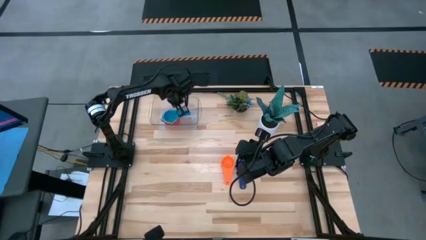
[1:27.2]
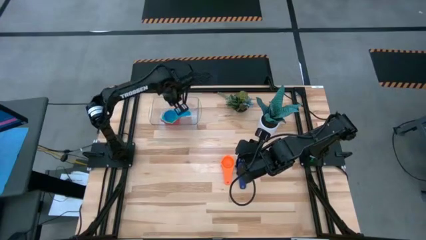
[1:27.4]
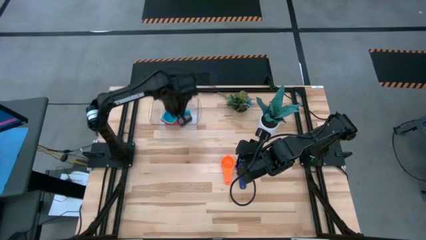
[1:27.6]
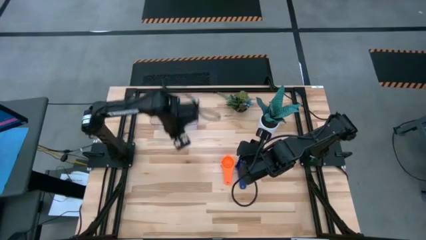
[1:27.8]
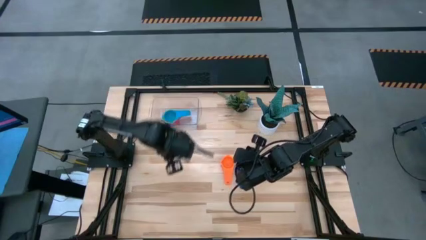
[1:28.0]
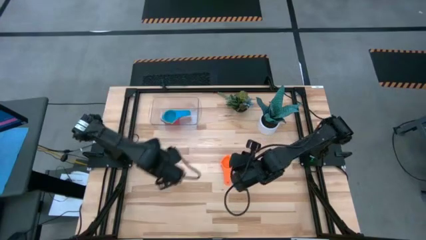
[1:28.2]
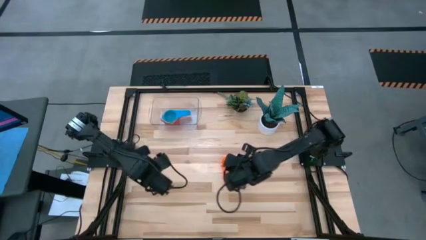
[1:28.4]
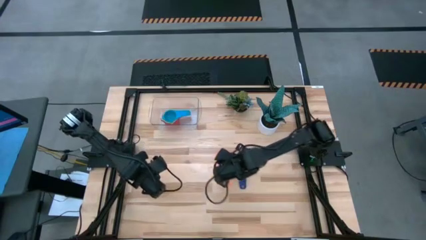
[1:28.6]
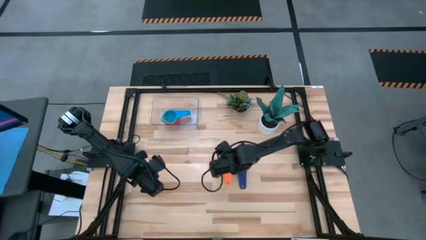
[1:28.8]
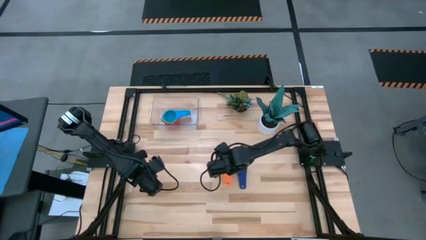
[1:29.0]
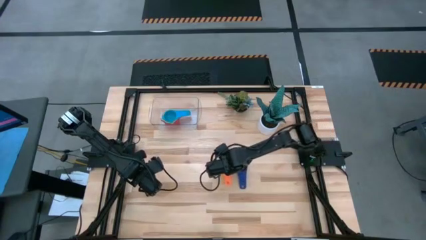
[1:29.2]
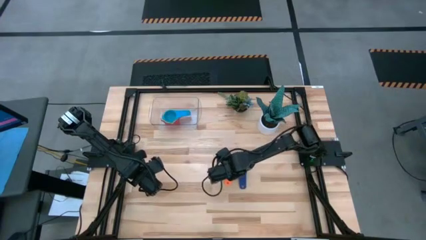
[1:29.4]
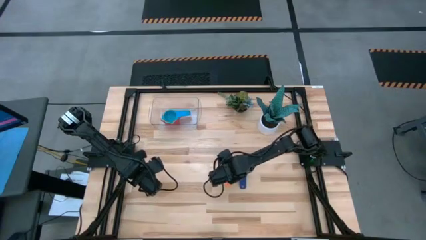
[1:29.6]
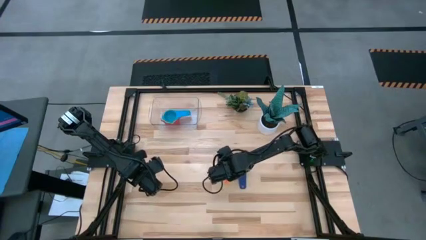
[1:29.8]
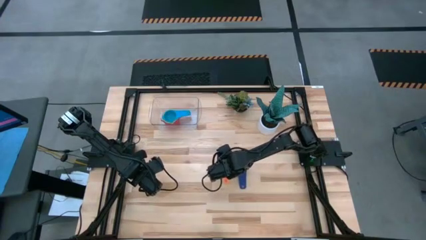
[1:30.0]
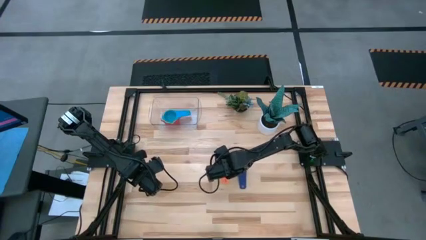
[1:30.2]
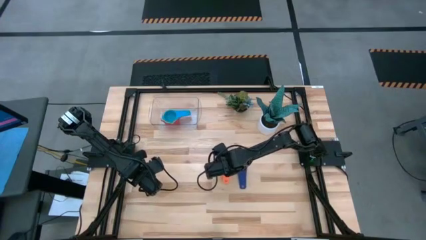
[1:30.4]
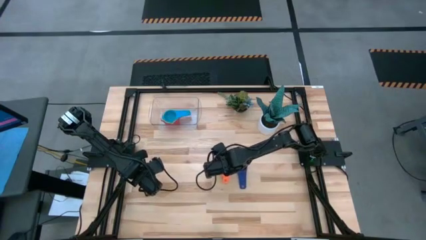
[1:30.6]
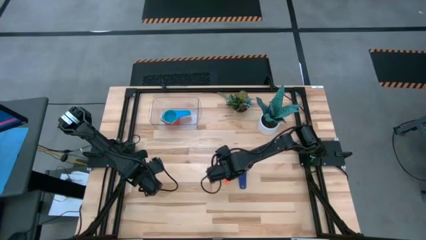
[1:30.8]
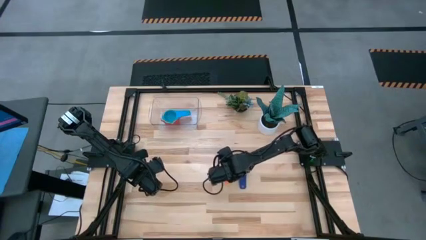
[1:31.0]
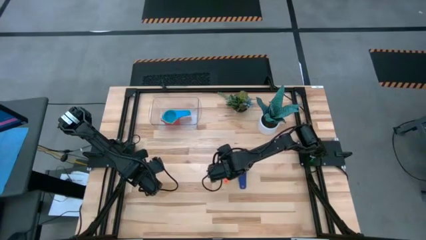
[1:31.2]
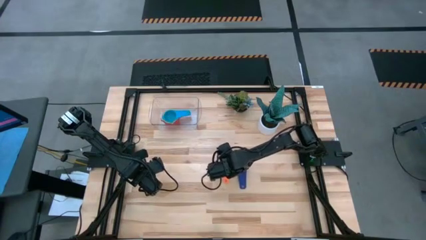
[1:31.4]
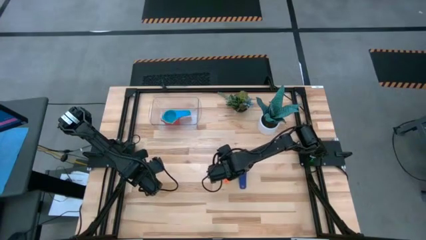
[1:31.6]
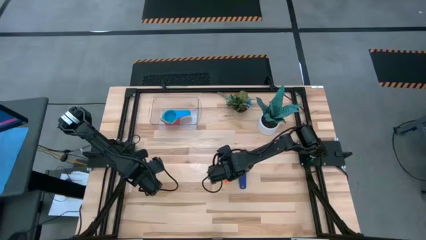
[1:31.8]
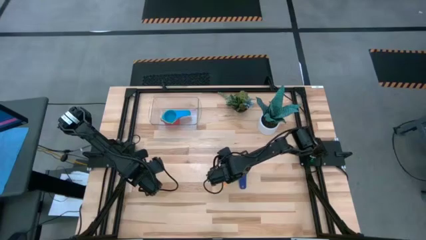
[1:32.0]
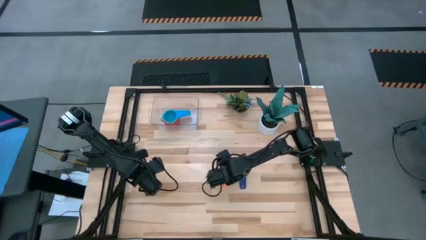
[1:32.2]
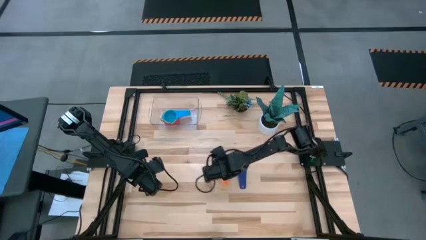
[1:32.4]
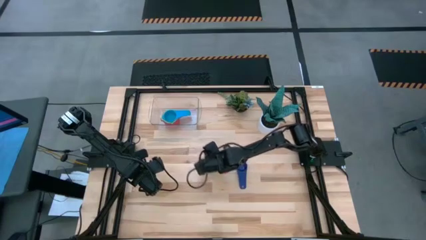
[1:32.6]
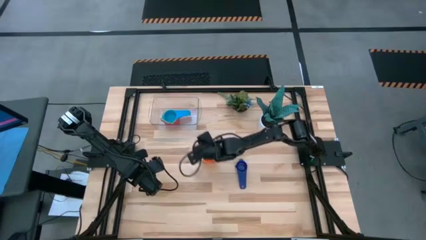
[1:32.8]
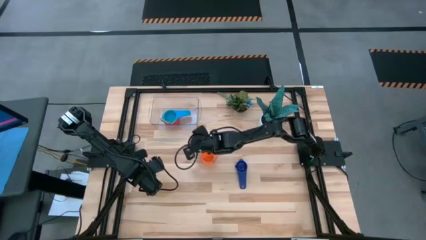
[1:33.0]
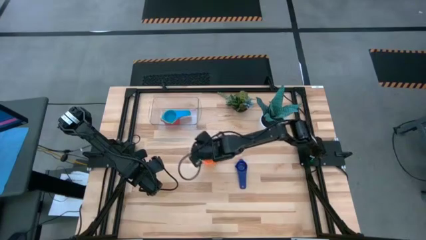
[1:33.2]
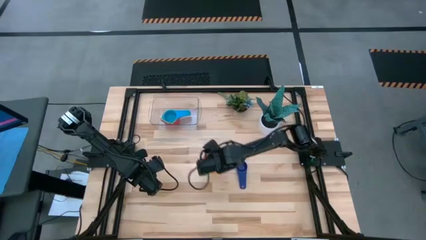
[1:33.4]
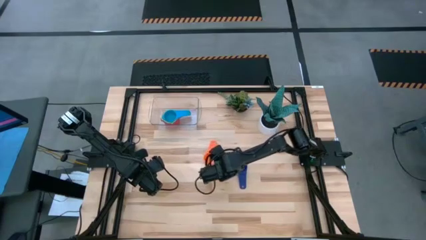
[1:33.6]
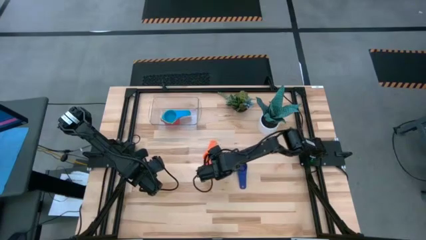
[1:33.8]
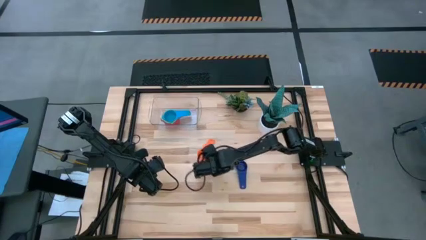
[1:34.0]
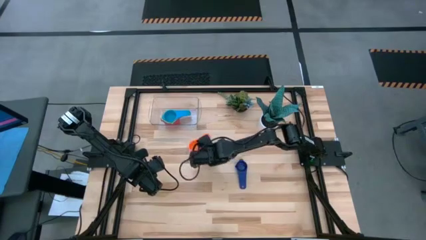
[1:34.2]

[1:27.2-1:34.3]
Task: Nest measuring cups in basket
Move the orange measuring cup to the top of the table

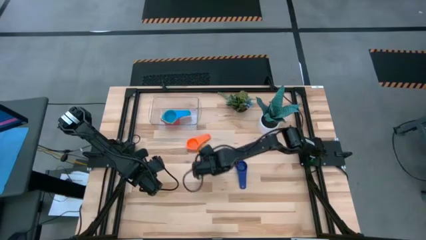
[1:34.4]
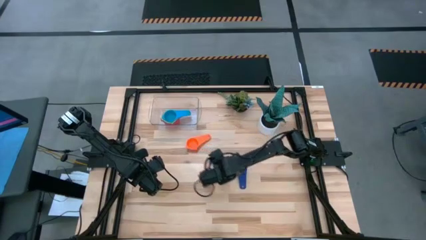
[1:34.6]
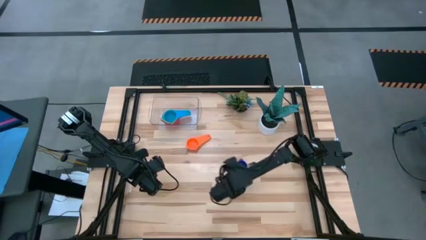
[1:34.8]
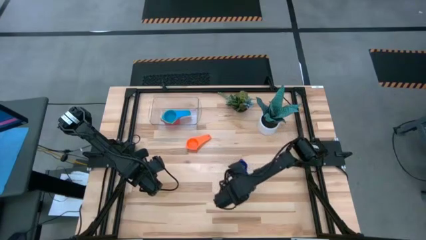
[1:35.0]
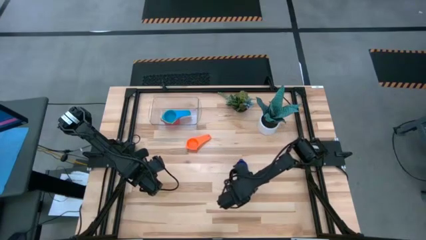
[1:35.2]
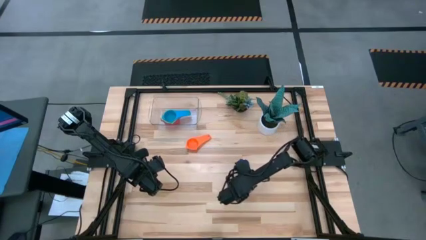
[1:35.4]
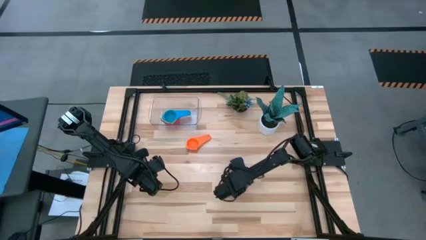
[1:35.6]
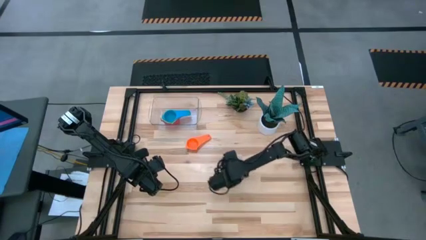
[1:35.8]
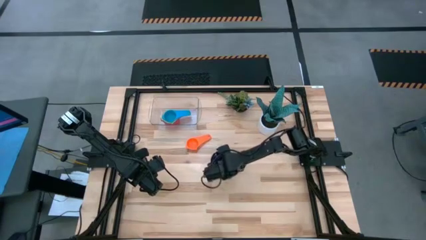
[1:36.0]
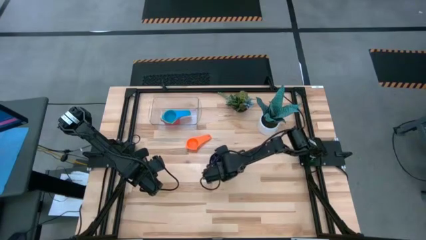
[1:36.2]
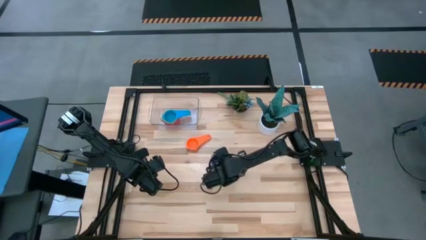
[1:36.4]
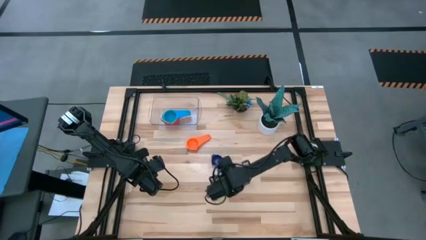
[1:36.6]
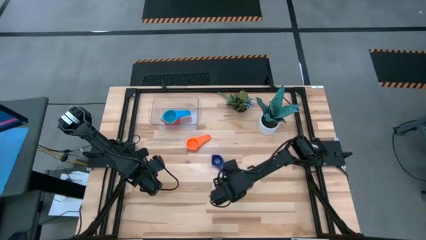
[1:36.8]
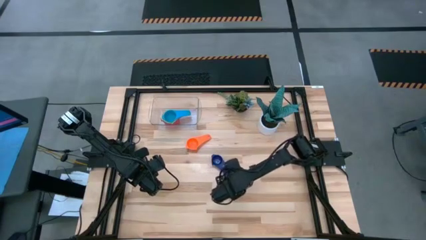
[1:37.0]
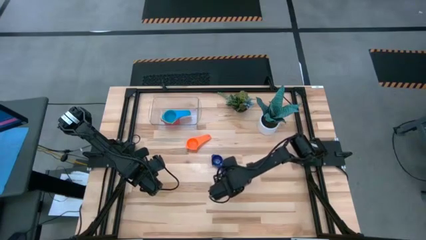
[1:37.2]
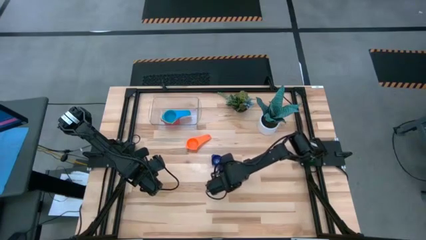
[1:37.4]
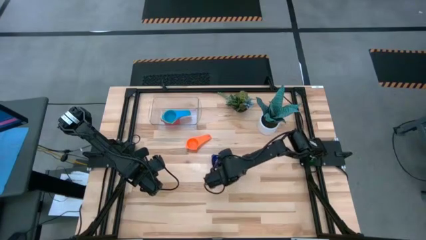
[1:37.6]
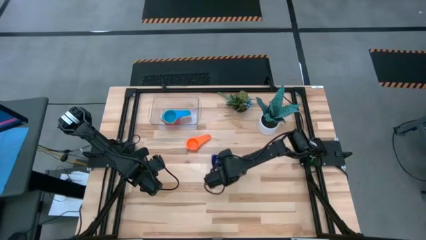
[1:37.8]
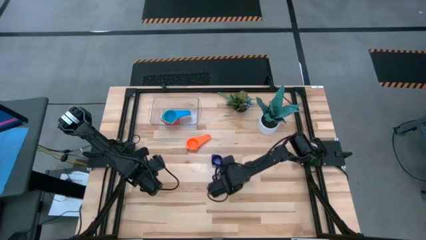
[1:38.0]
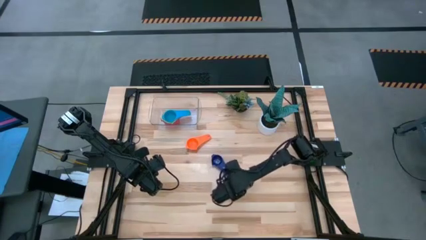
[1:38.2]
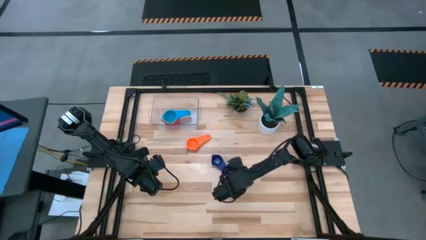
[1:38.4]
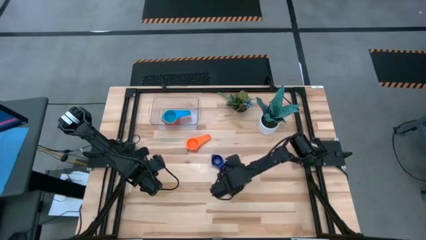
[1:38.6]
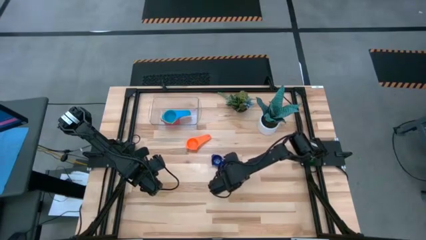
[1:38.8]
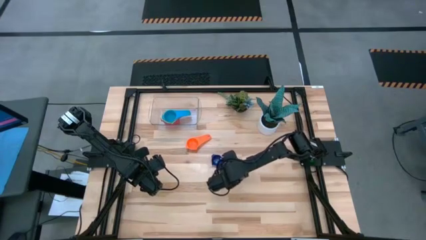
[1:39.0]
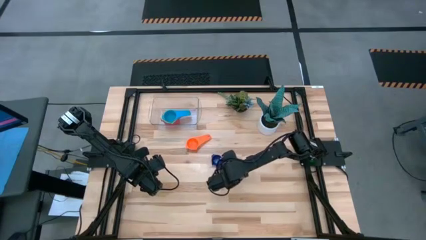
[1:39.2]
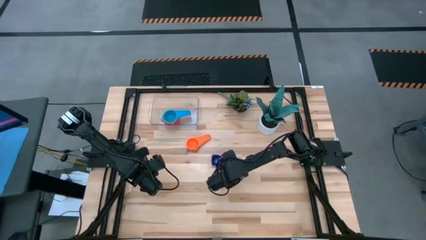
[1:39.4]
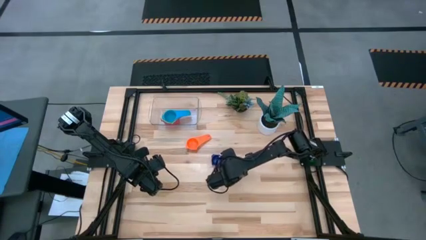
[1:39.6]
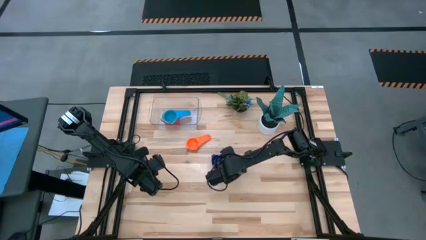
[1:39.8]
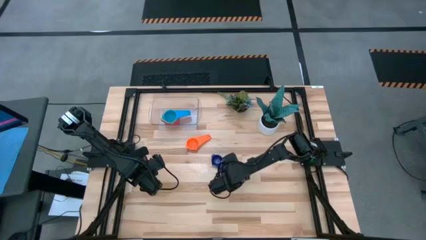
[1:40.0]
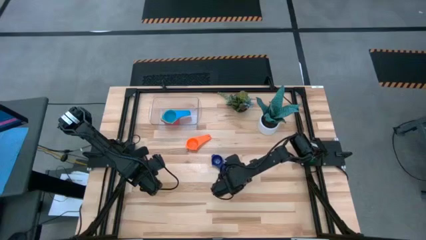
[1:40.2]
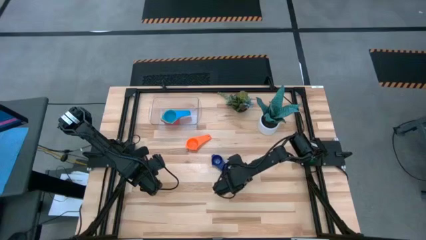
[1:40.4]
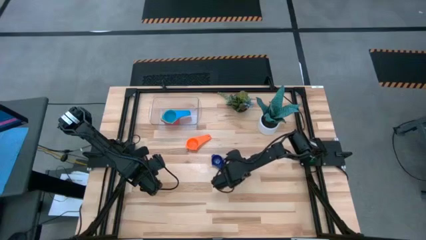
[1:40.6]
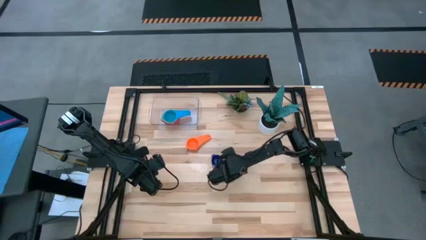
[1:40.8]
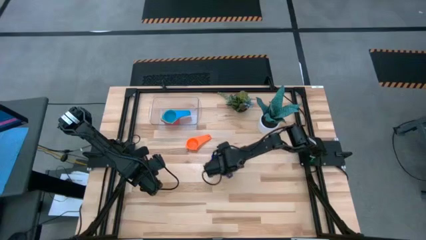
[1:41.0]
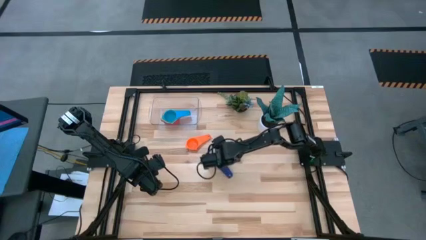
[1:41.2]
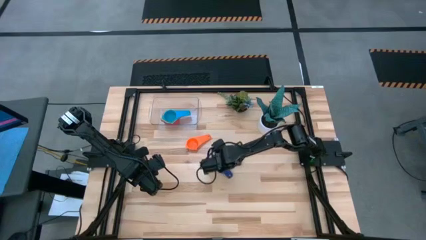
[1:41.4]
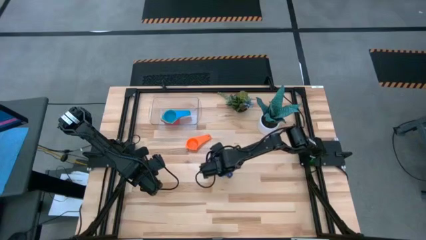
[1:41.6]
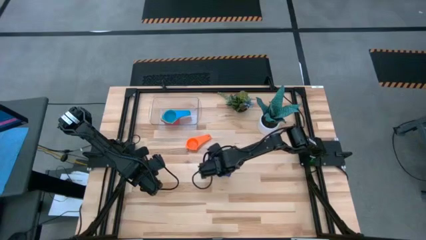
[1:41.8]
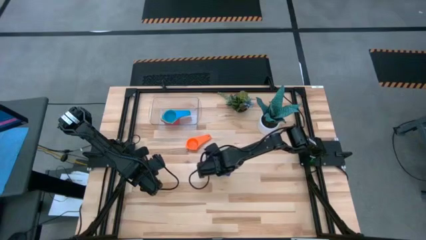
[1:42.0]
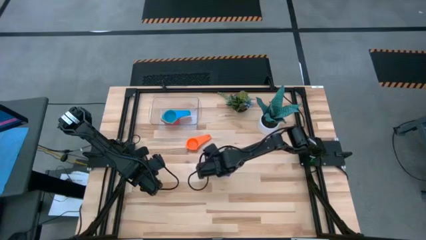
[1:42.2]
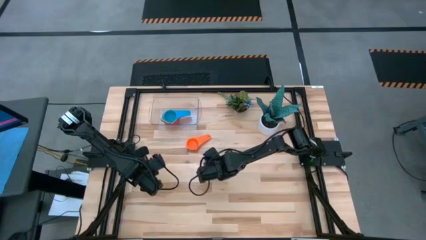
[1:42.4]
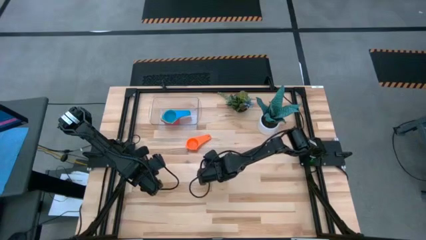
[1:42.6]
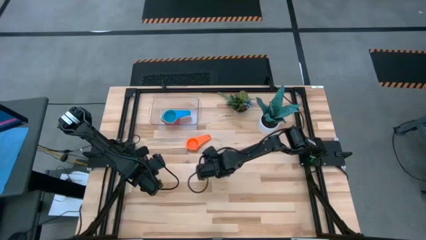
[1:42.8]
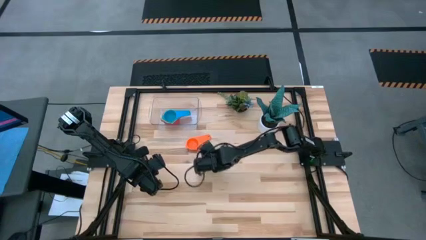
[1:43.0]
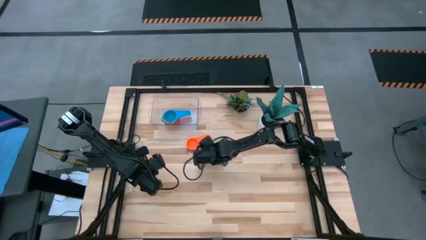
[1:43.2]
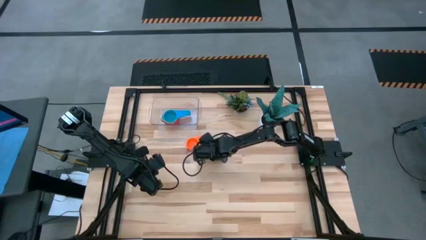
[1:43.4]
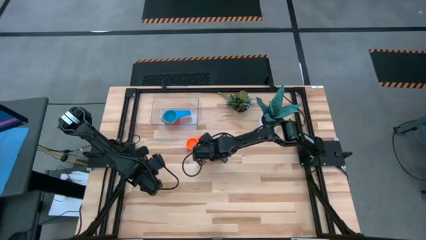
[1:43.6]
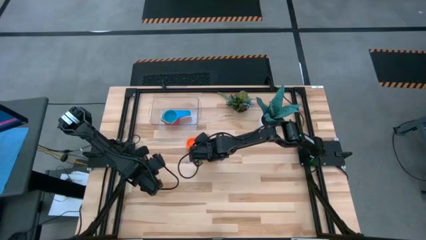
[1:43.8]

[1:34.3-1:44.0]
Move the dark blue measuring cup to the top of the table
